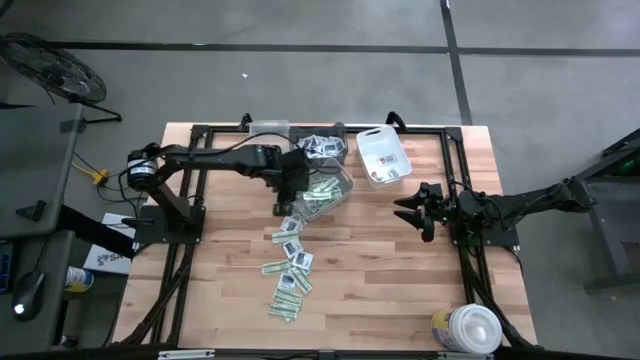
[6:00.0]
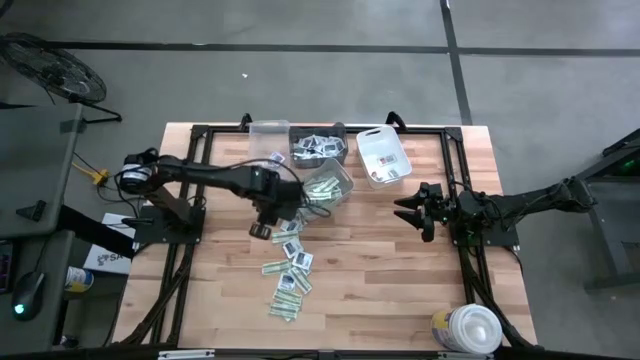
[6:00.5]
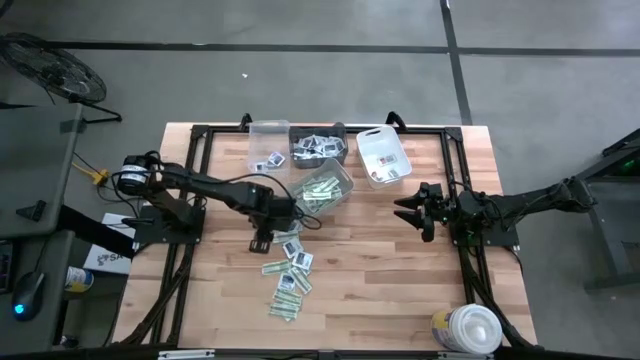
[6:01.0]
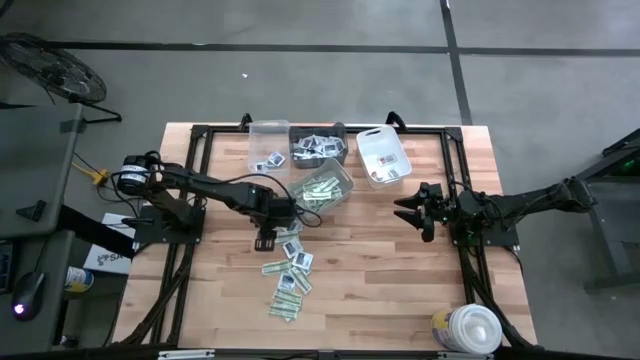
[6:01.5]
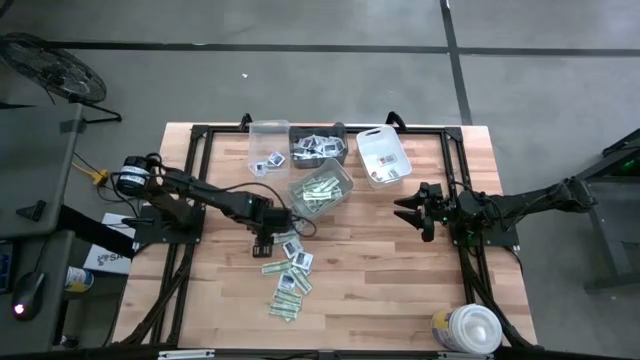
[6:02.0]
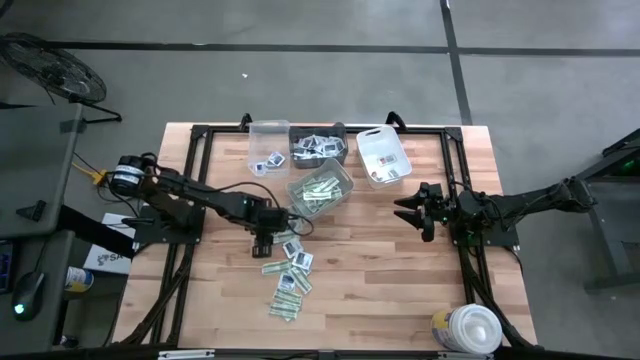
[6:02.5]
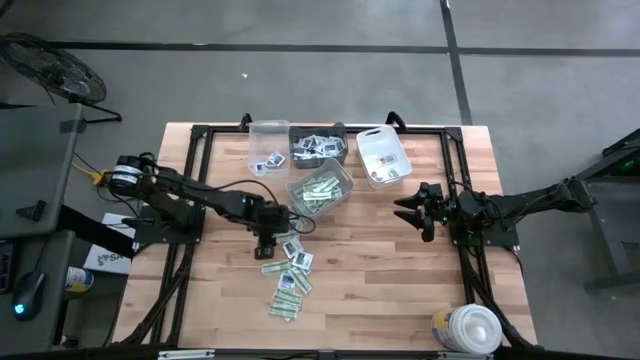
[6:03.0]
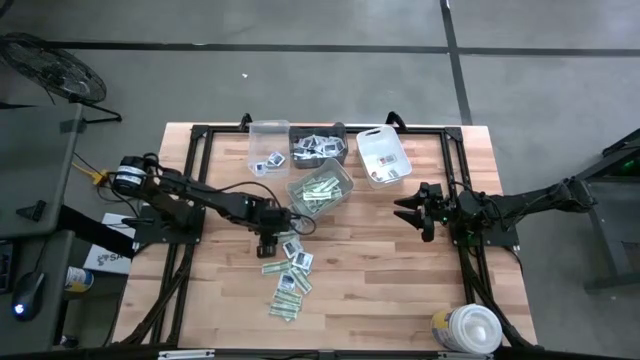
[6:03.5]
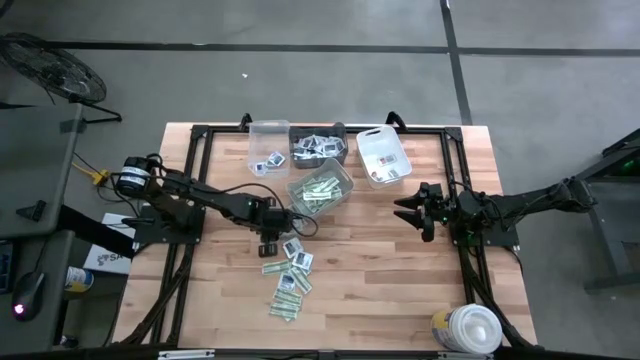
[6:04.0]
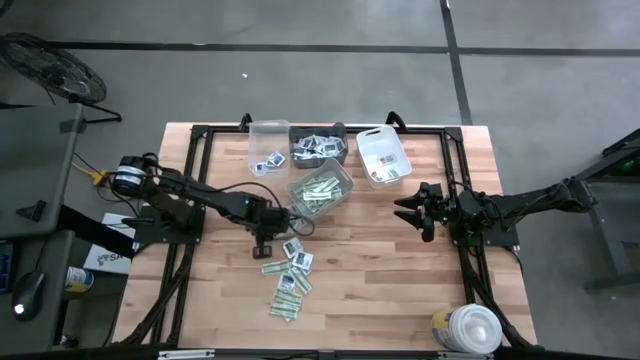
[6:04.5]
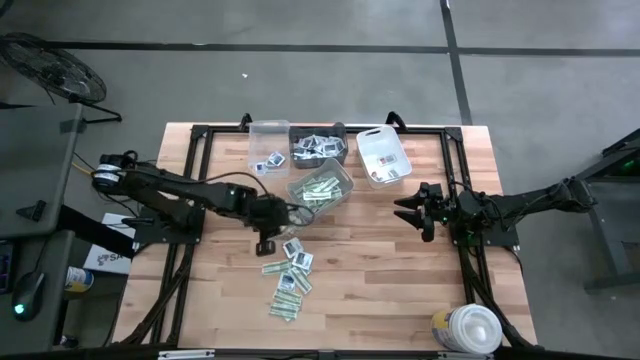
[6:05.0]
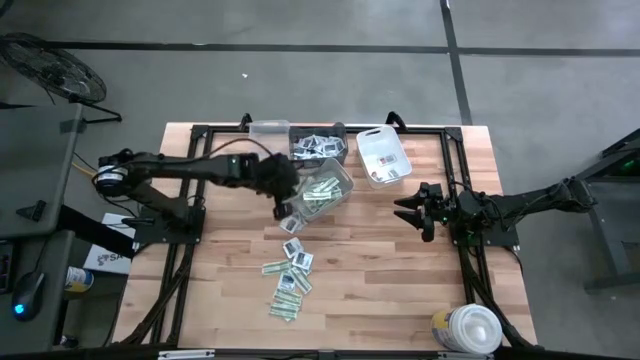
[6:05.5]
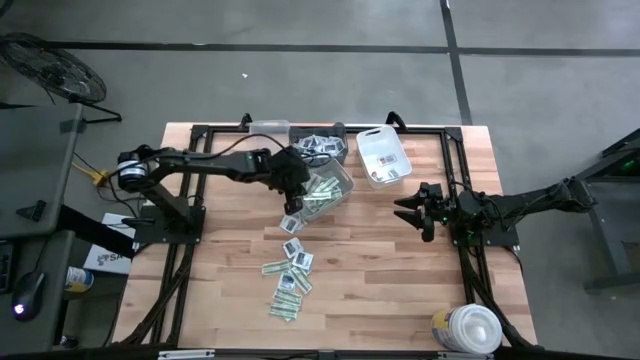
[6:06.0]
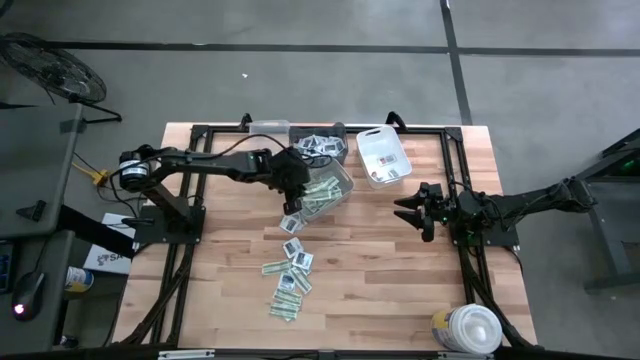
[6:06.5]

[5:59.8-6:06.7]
Task: Pick & Place First Aid Supplies
Put the bandage pack into the gray bin

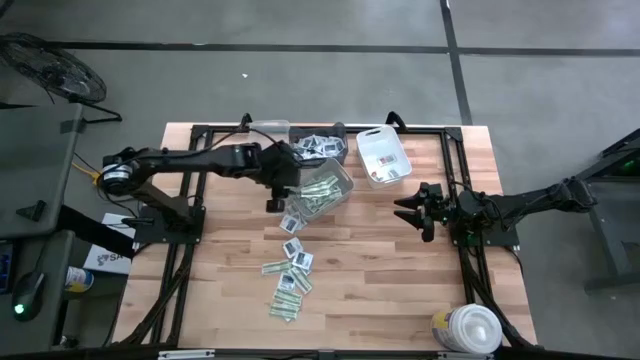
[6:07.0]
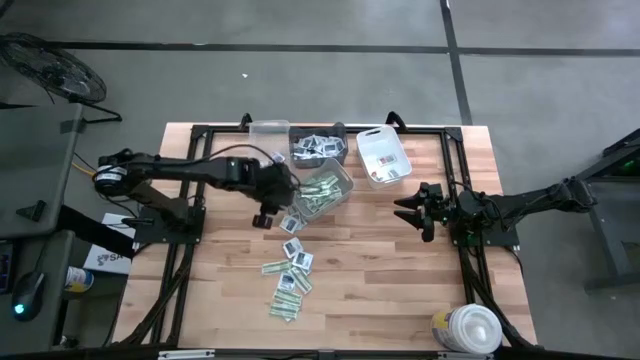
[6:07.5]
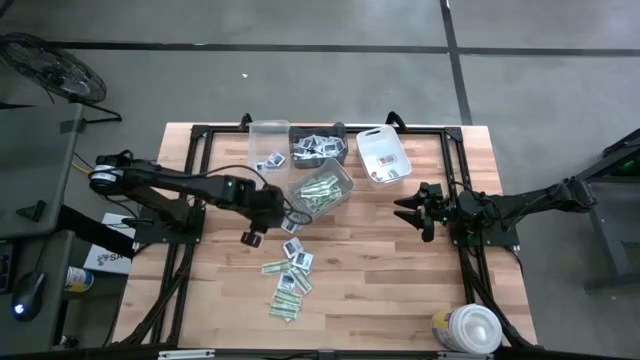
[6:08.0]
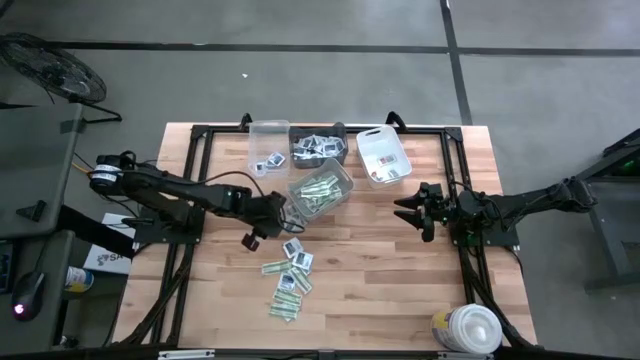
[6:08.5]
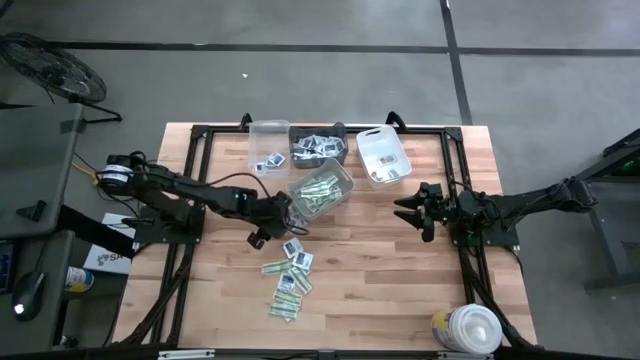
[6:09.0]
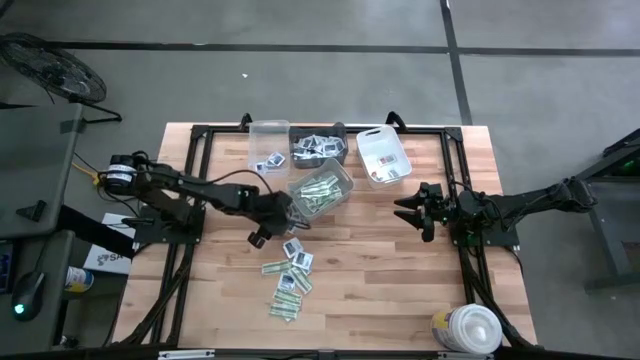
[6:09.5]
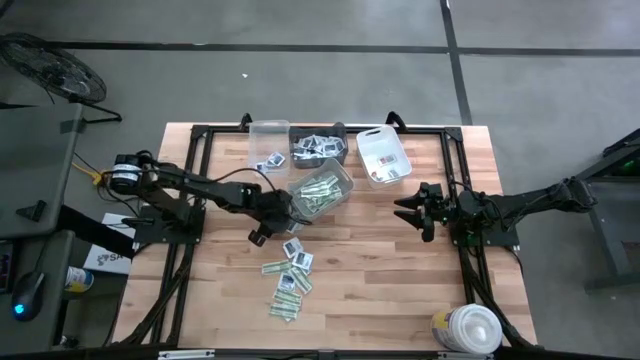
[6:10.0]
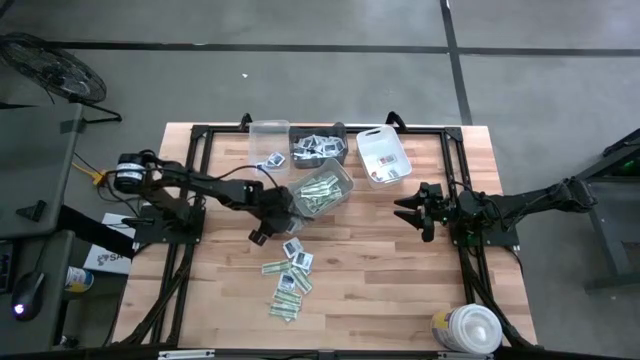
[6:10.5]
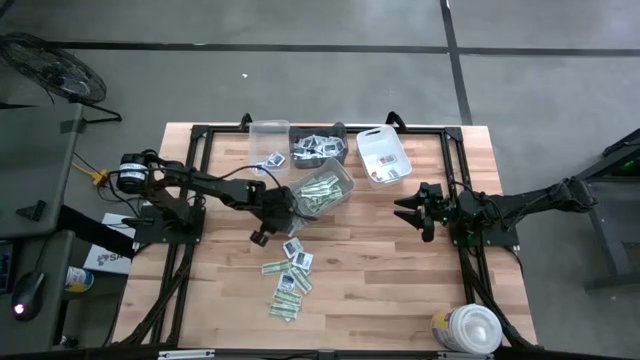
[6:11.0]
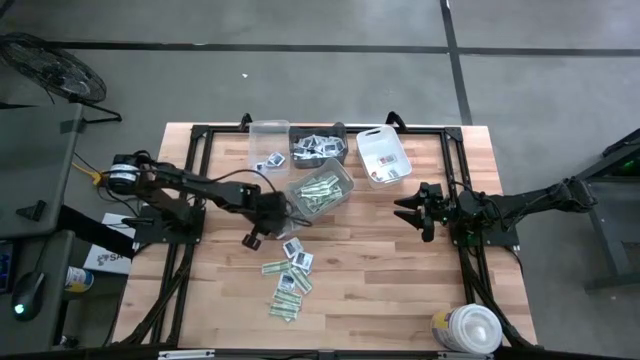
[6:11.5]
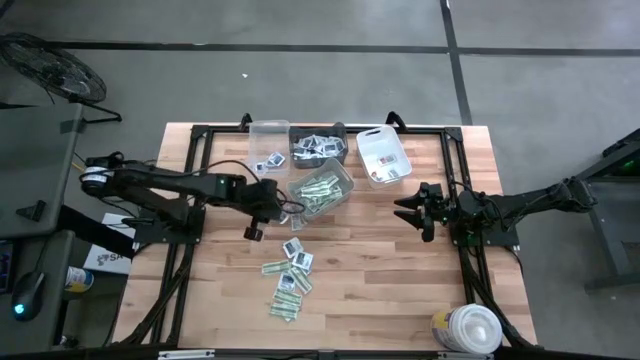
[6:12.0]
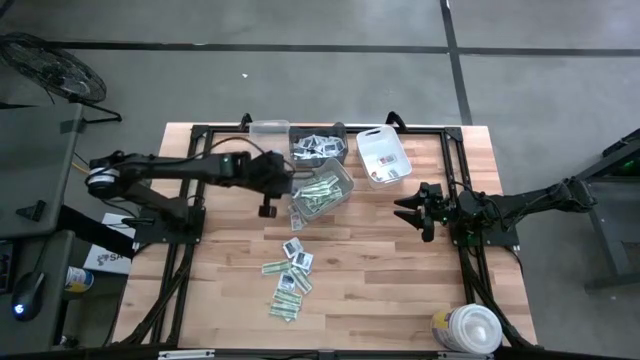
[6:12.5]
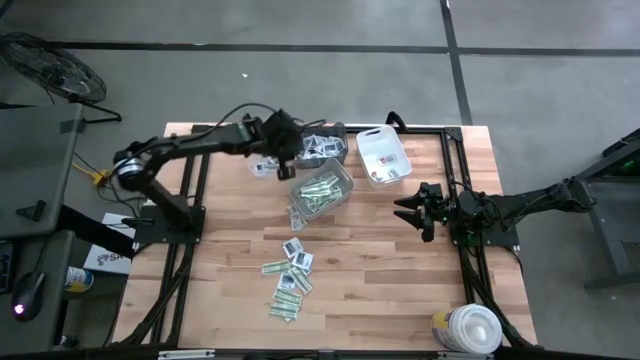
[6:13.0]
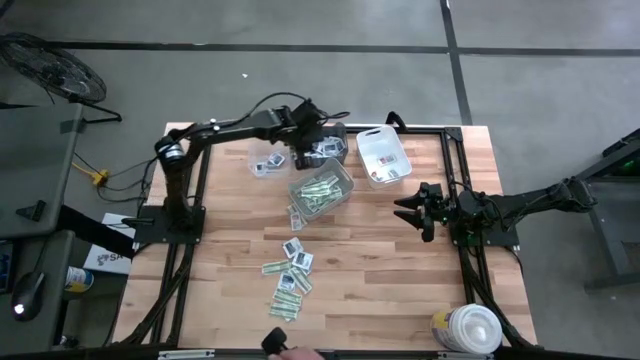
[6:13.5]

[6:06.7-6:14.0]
Put the towelette pack into the black bin

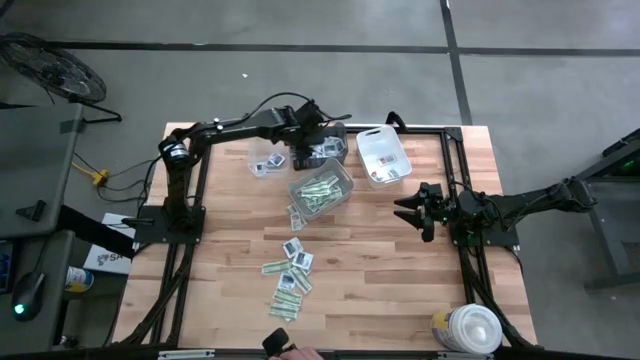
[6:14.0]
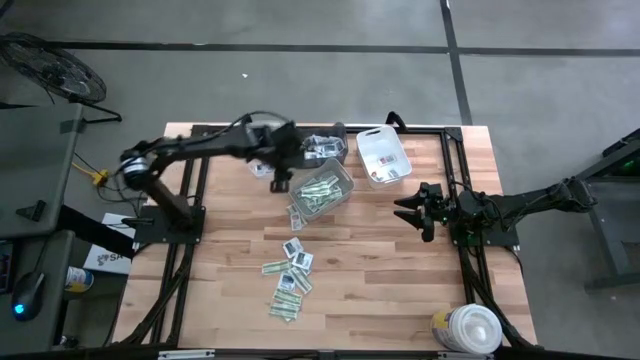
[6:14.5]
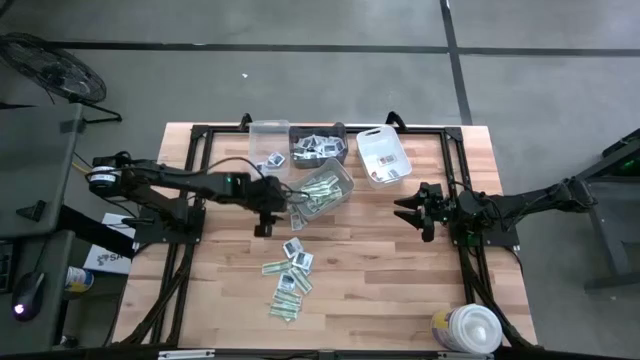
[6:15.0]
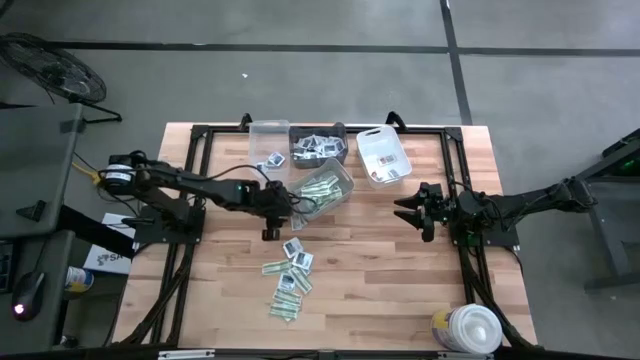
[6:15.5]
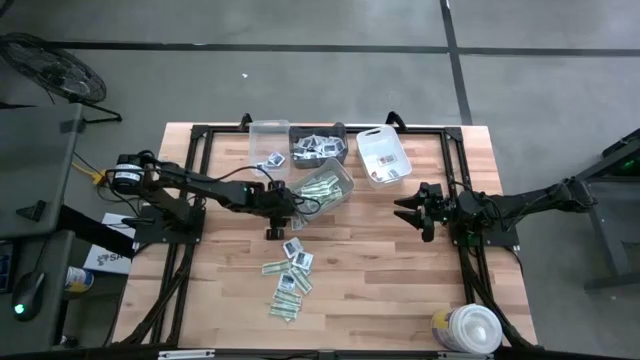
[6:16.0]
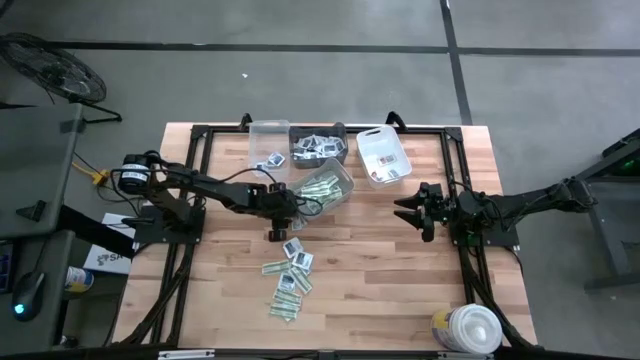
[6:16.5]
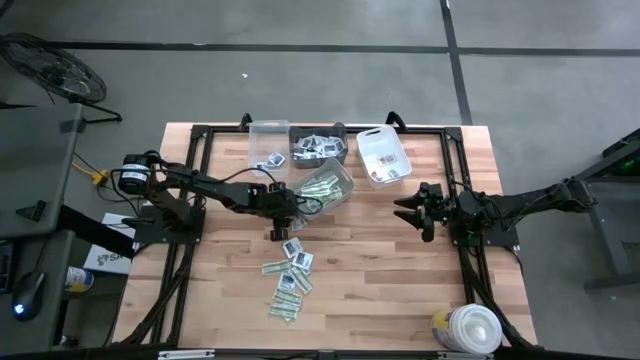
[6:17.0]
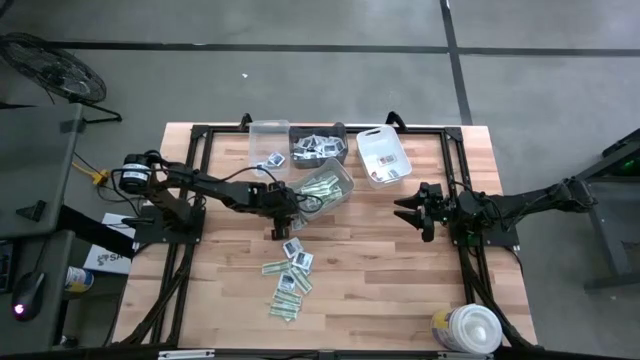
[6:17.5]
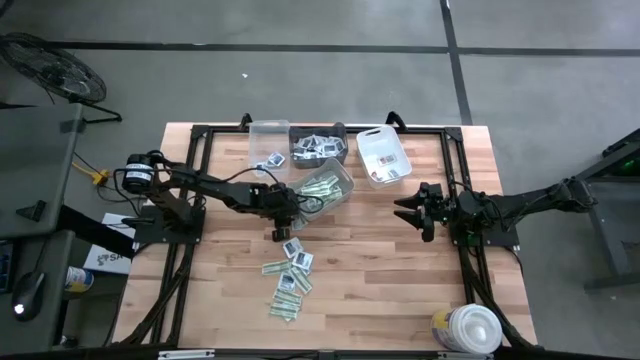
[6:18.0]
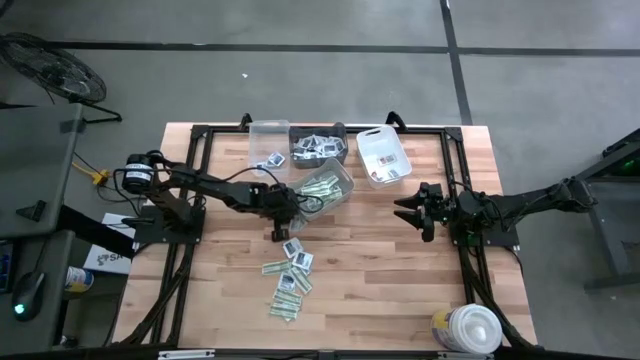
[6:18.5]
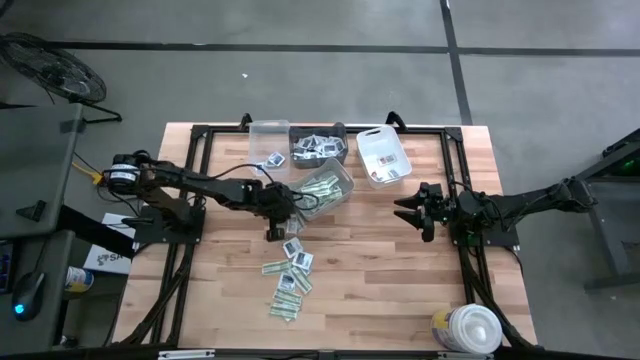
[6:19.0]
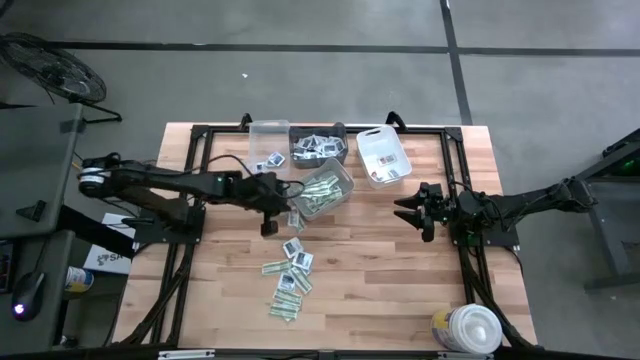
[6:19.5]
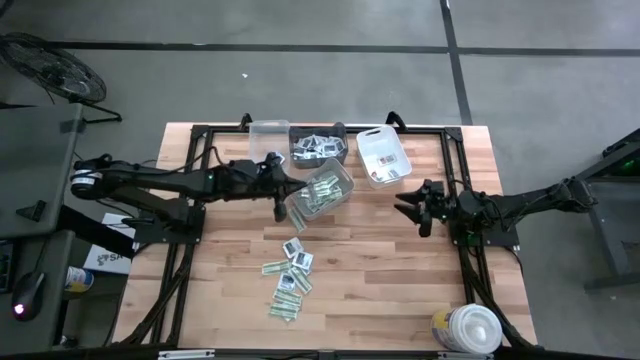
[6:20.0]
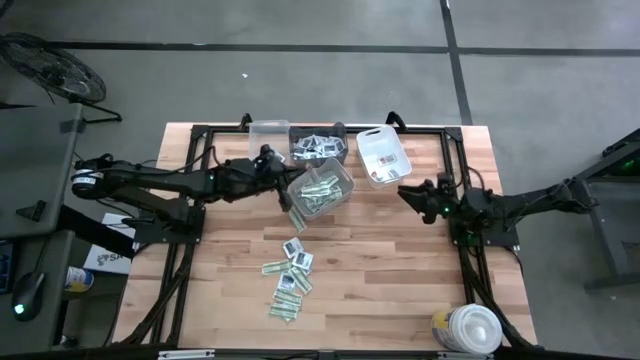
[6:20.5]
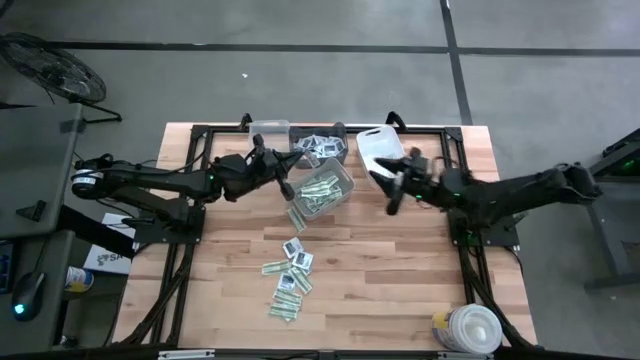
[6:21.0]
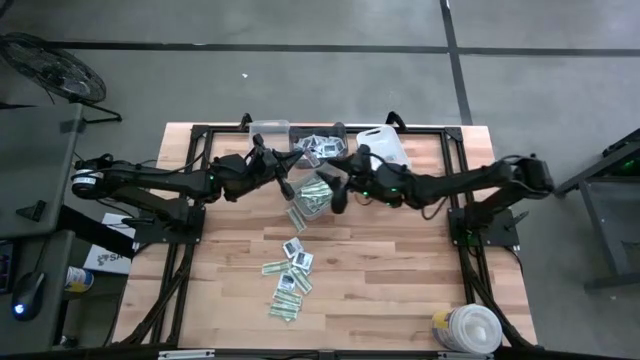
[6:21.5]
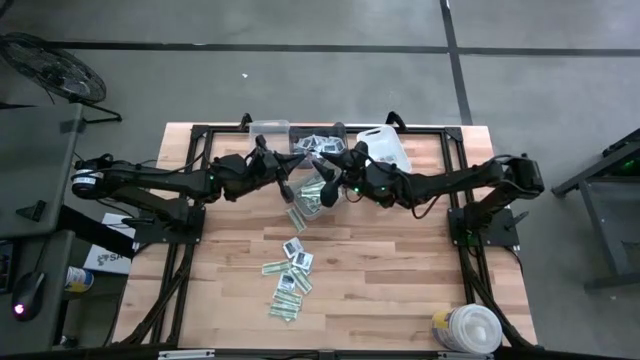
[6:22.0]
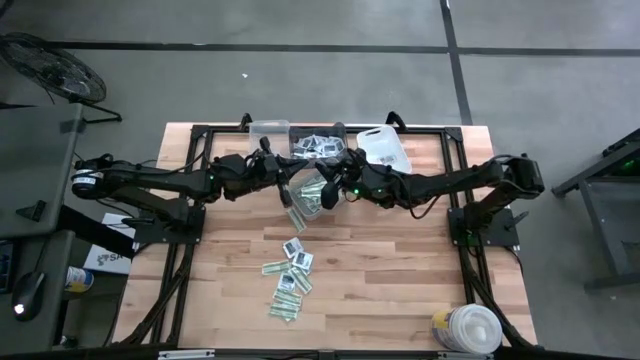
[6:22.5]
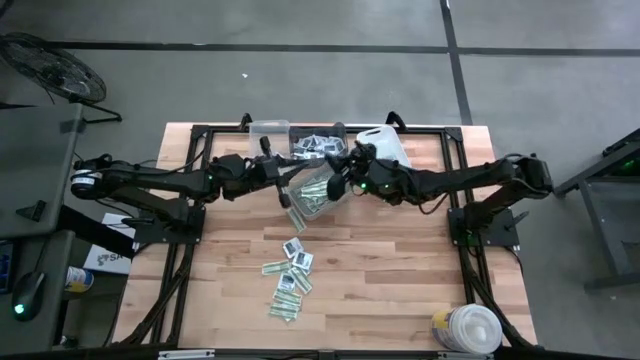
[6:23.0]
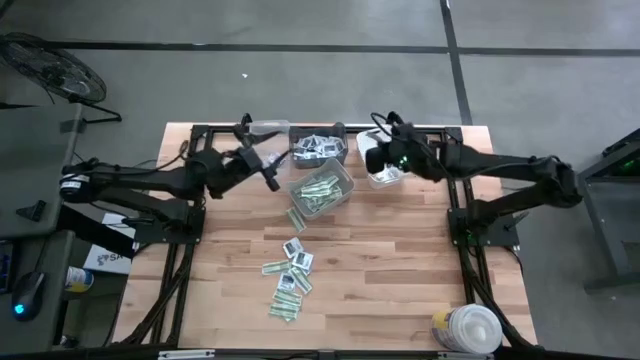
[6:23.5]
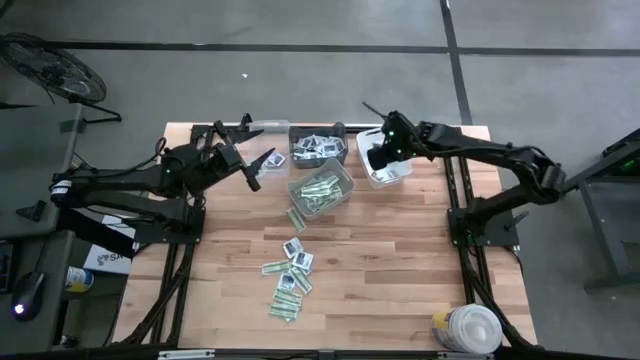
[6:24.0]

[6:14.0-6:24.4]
Put the ointment pack into the white bin
